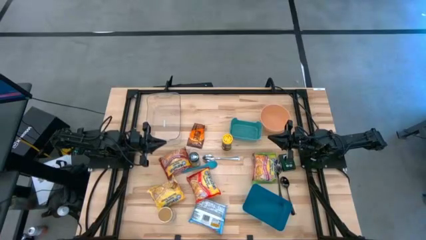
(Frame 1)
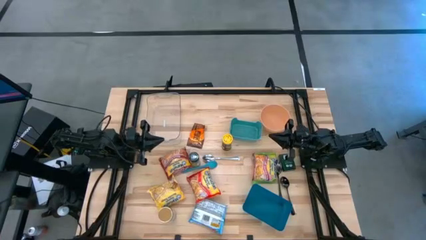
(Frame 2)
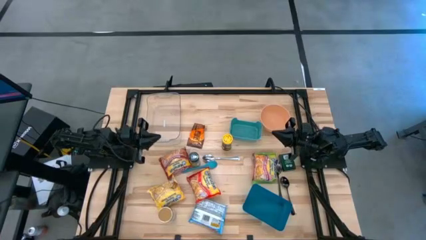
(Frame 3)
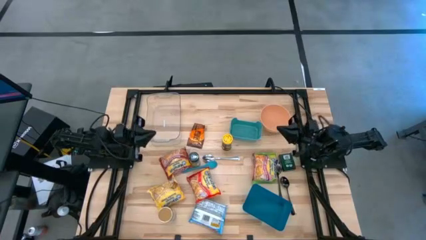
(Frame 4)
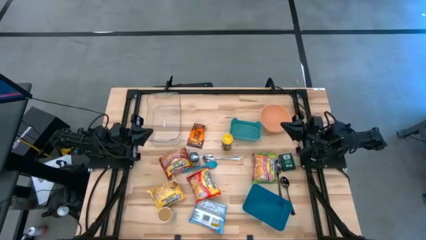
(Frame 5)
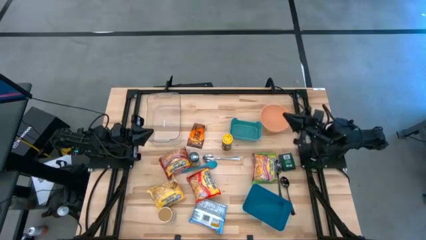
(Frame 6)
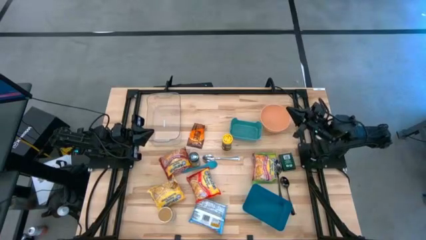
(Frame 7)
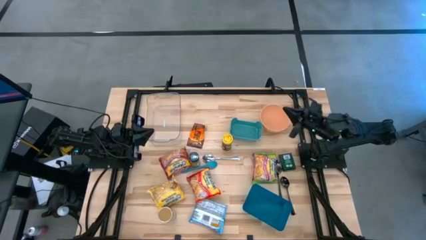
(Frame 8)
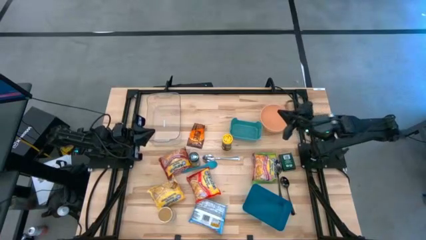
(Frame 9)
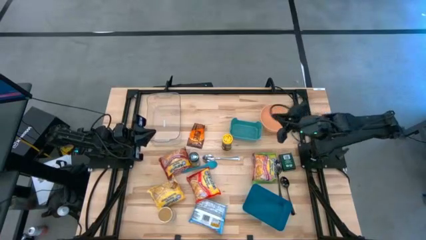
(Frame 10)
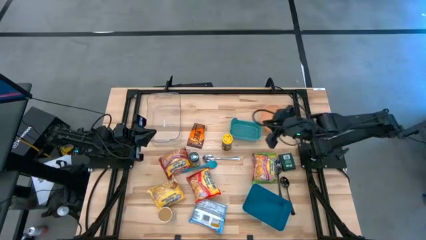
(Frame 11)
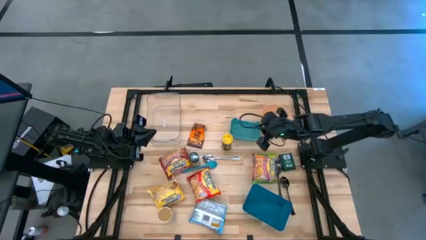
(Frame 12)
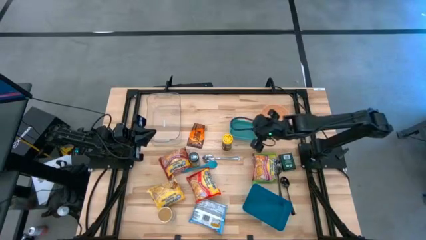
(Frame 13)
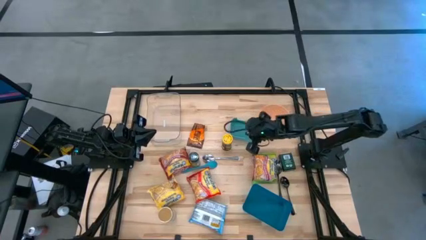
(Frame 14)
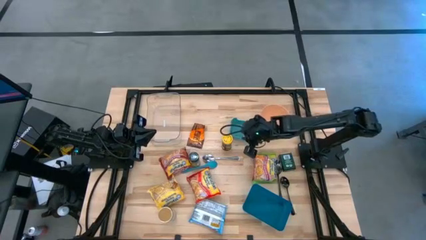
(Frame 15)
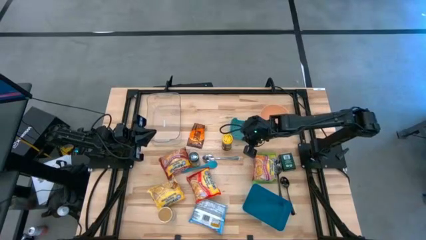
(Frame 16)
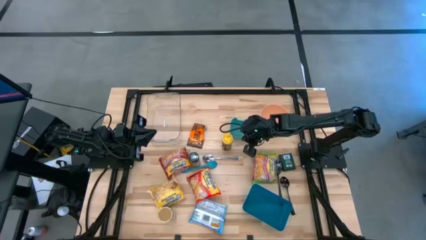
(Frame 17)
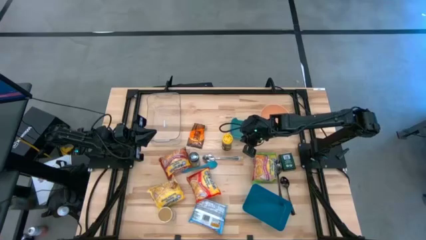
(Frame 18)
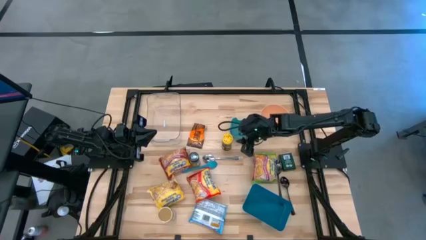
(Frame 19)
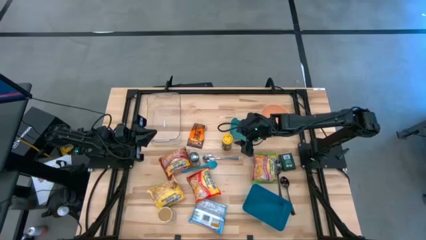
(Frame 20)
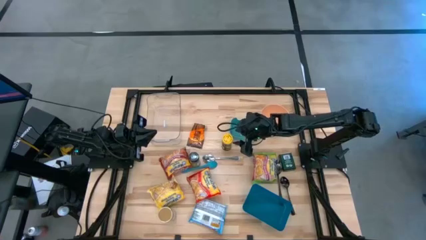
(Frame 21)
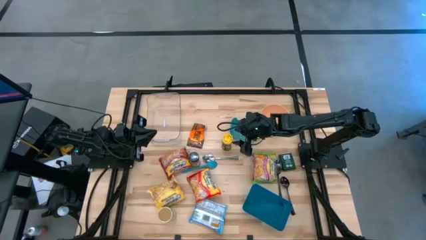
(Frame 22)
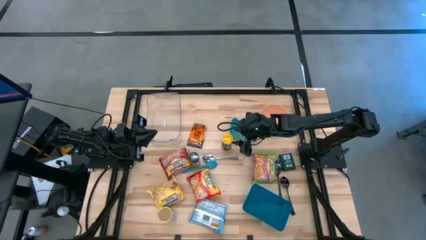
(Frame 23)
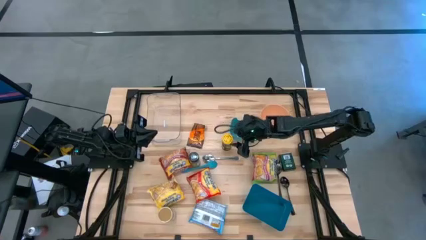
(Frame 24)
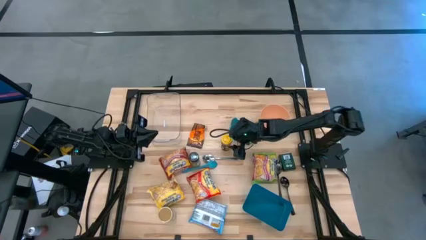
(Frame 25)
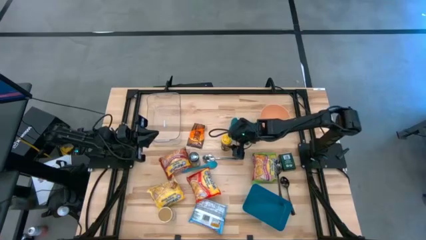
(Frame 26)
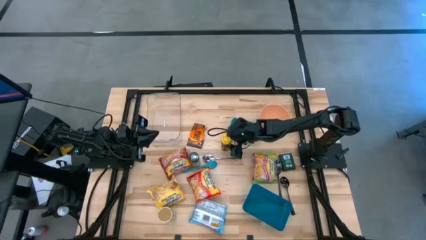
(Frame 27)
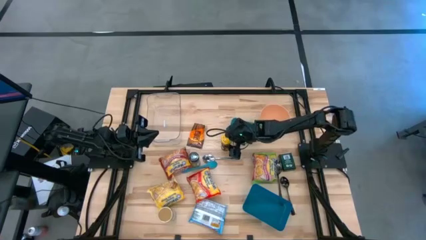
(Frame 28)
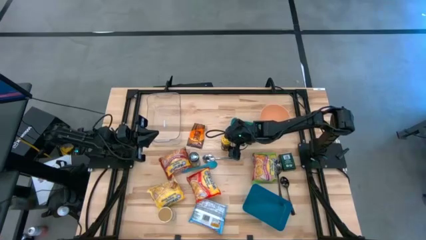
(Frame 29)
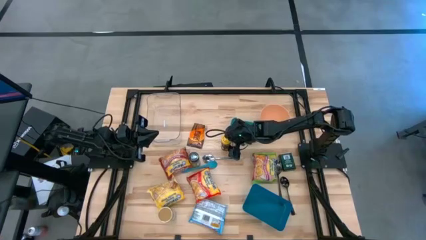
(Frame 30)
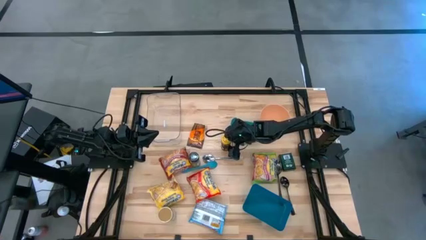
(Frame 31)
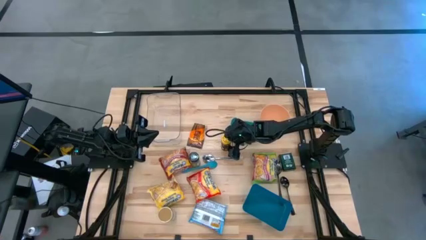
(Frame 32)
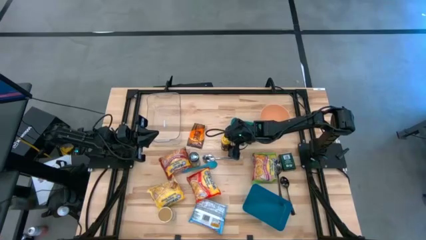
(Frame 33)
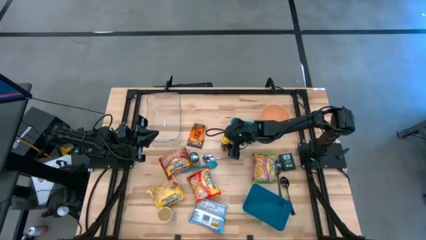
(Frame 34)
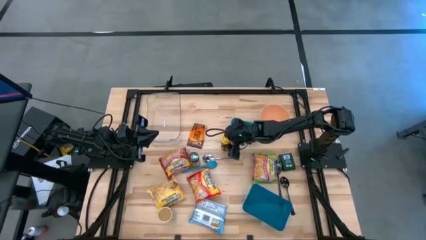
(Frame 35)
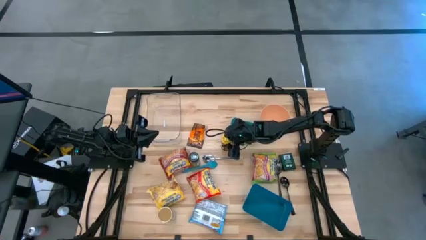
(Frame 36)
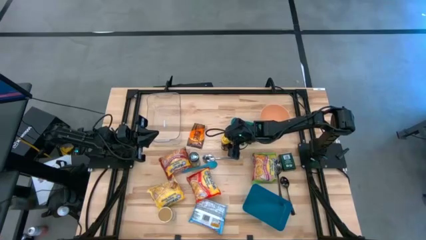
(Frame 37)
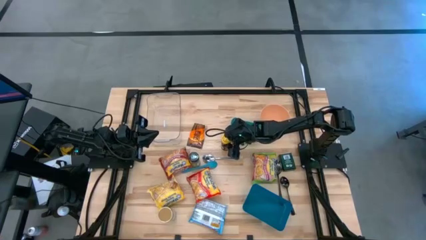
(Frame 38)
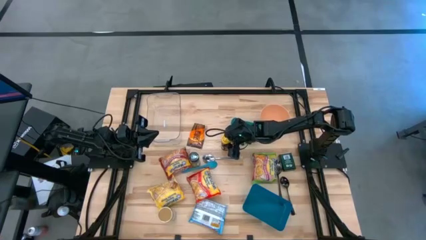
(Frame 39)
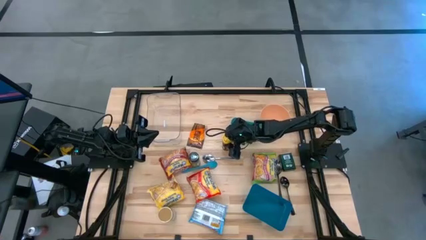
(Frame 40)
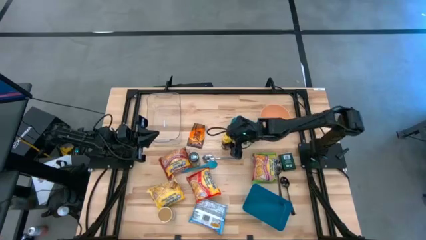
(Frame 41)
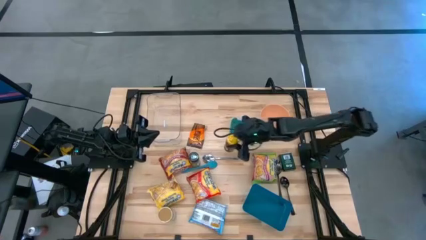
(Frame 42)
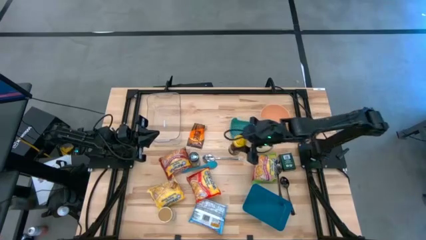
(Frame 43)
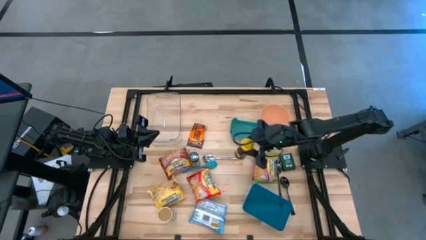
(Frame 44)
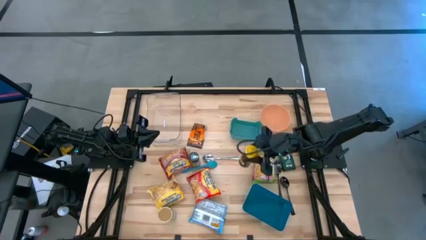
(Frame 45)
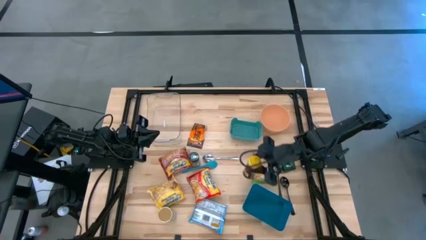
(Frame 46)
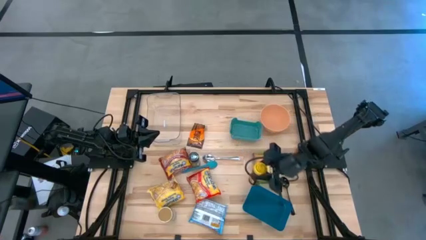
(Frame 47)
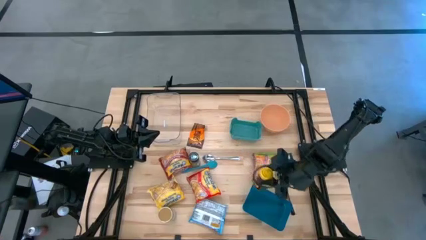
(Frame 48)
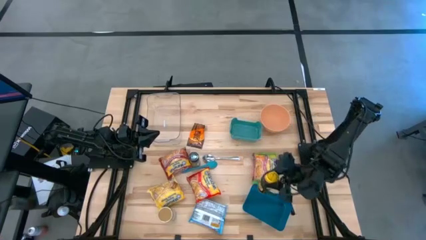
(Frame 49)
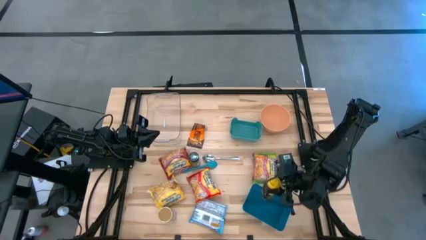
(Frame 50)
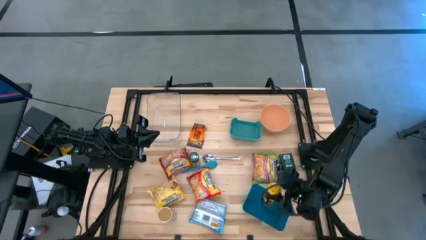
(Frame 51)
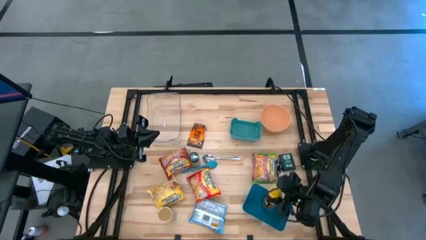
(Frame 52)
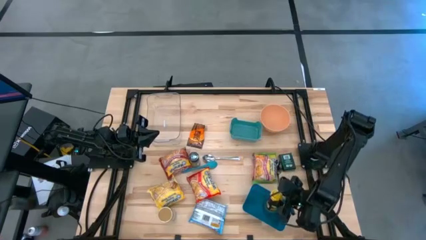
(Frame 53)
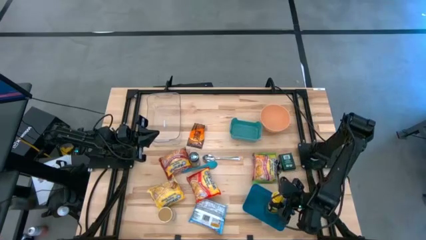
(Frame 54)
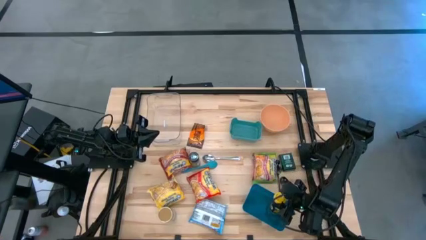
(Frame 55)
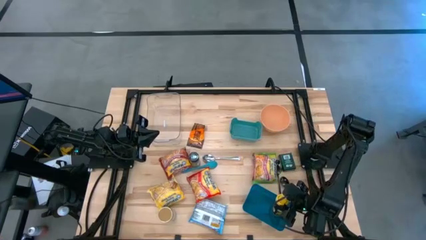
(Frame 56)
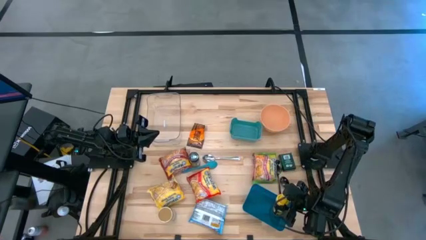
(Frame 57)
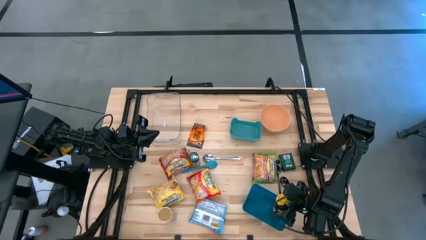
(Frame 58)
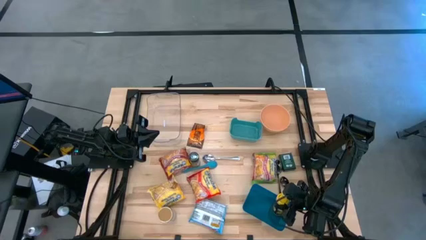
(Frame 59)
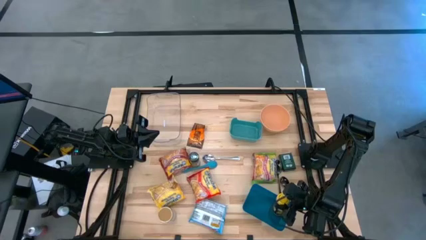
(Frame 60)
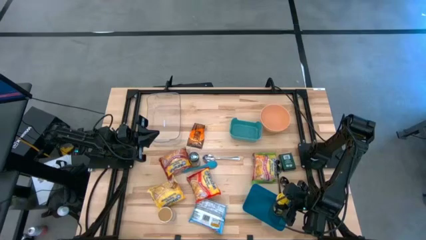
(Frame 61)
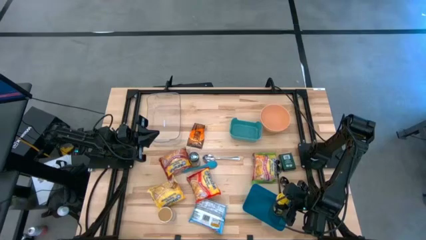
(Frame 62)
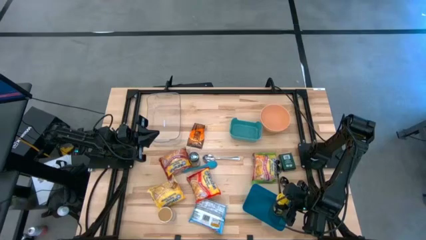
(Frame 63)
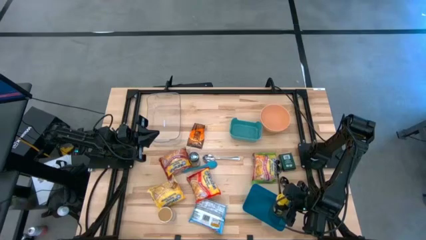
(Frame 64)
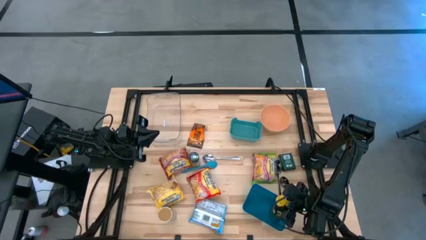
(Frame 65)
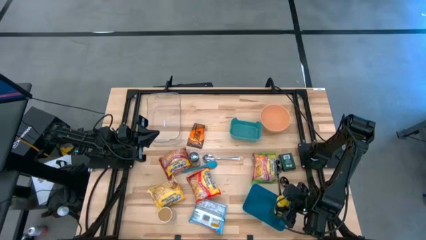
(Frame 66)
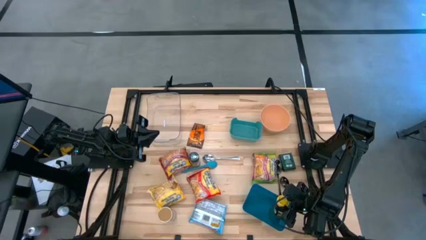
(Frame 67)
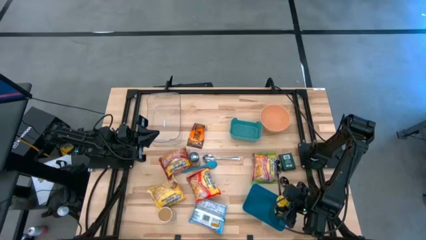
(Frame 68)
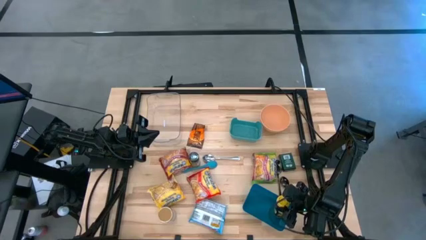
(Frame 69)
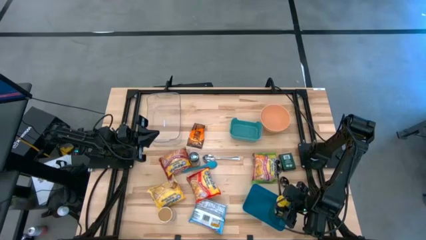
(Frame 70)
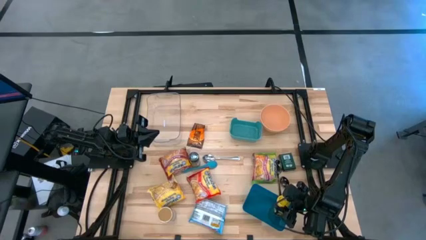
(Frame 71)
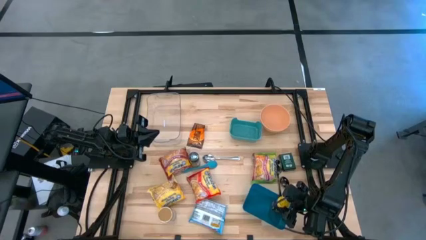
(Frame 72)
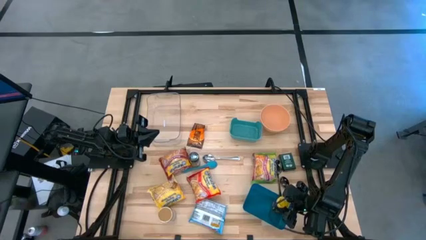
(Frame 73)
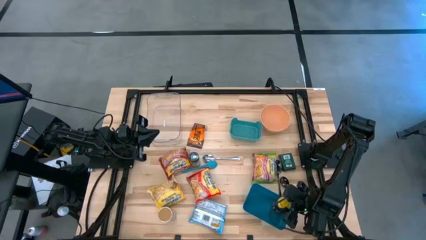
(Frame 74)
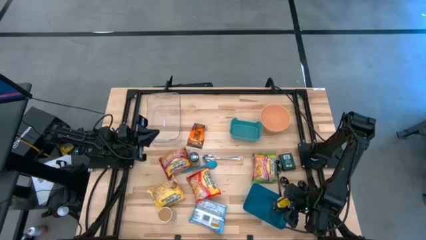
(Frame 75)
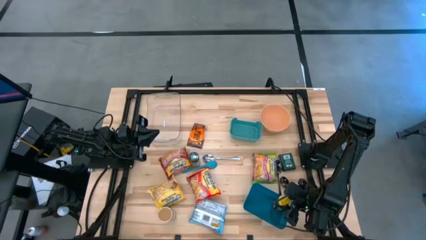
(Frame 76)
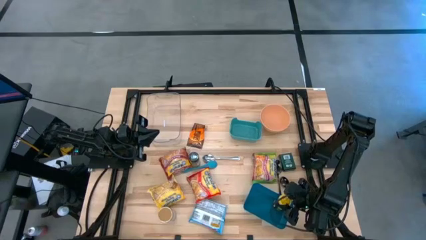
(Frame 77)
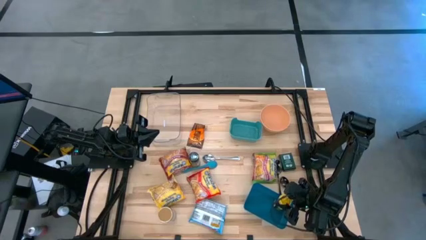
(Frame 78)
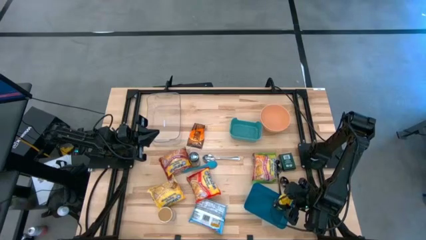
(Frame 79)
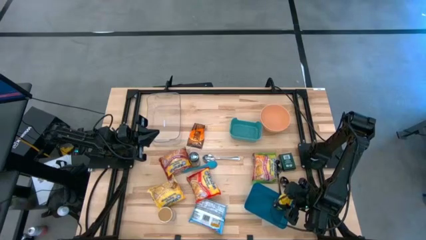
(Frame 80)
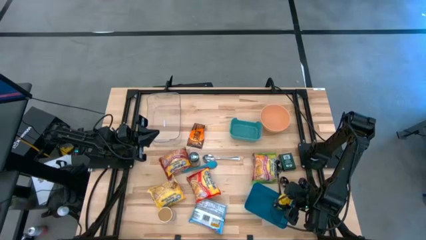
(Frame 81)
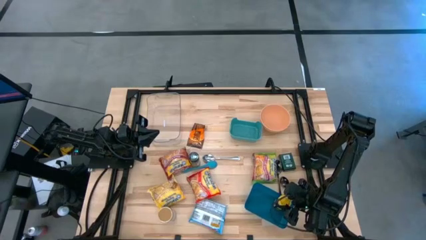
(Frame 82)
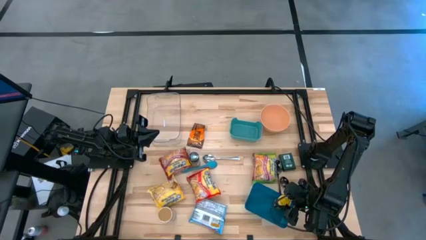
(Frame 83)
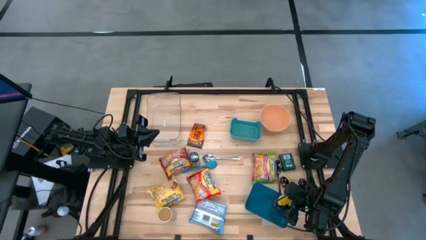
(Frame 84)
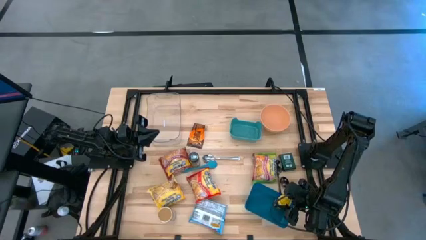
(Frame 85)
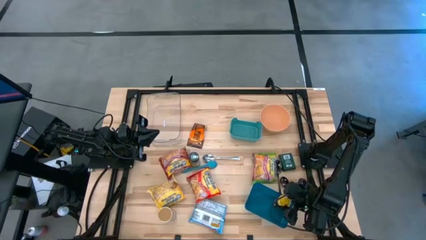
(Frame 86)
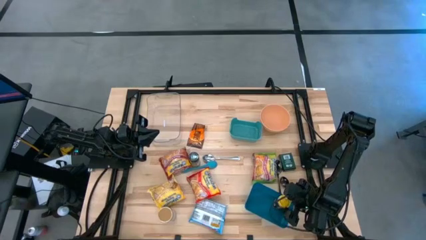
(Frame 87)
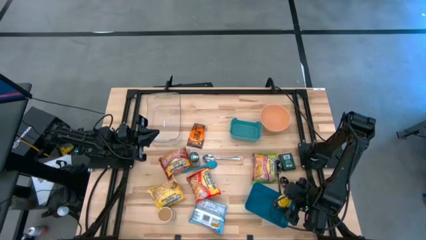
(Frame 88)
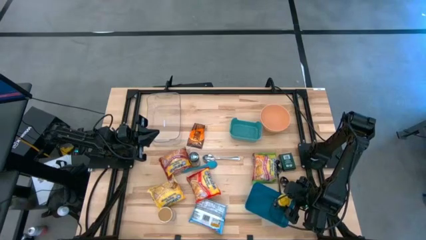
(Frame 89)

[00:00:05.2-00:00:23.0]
Task: Pick & Place Food Item
Put the yellow seasoning bottle into the blue bin
